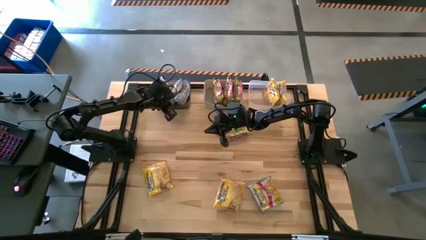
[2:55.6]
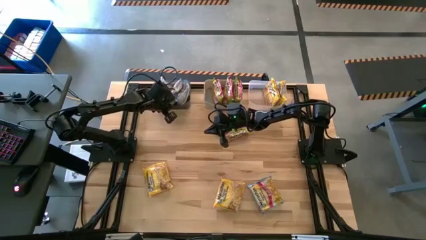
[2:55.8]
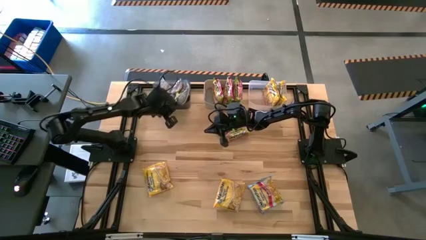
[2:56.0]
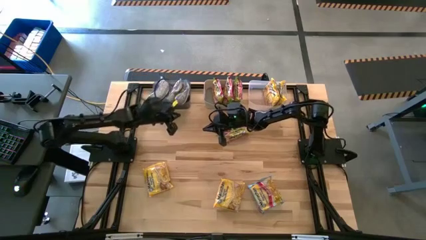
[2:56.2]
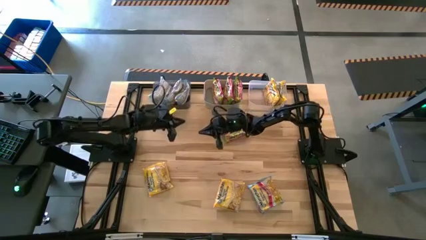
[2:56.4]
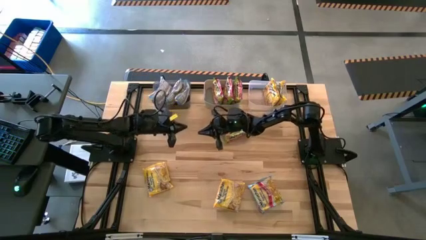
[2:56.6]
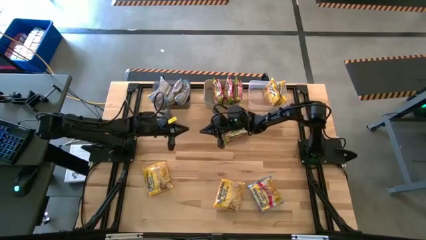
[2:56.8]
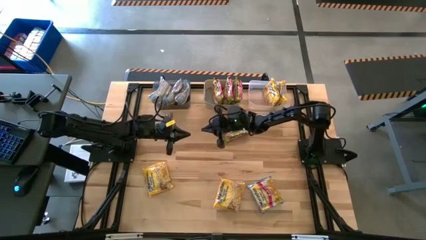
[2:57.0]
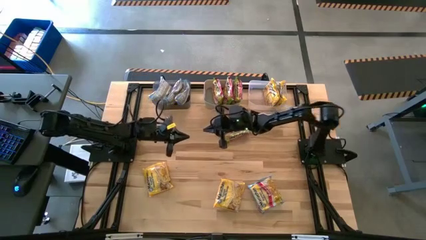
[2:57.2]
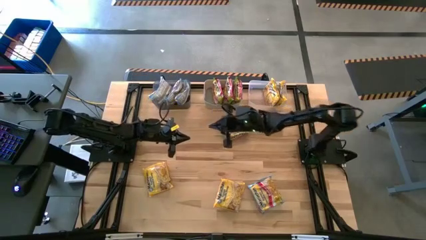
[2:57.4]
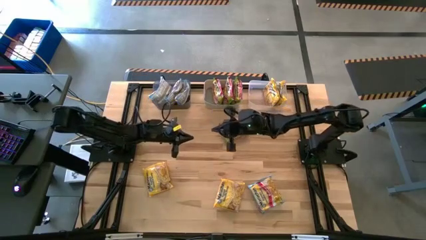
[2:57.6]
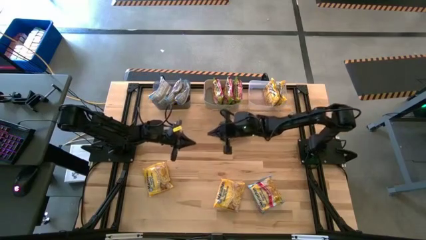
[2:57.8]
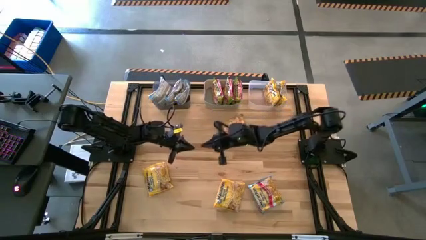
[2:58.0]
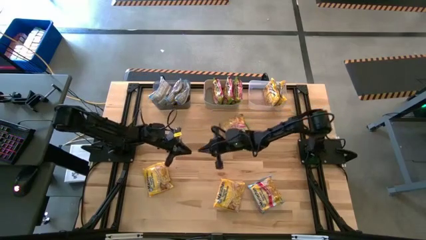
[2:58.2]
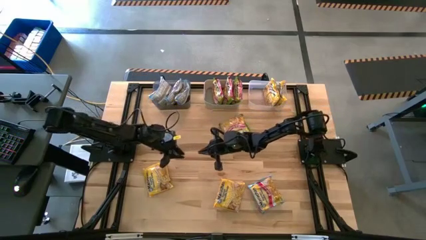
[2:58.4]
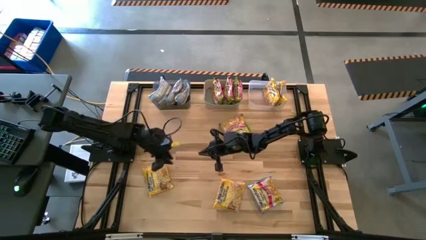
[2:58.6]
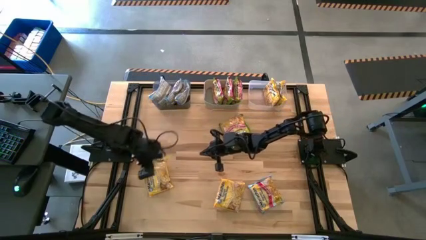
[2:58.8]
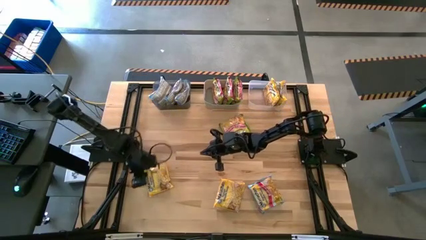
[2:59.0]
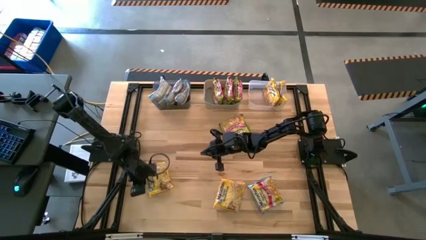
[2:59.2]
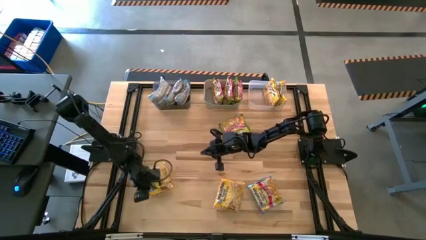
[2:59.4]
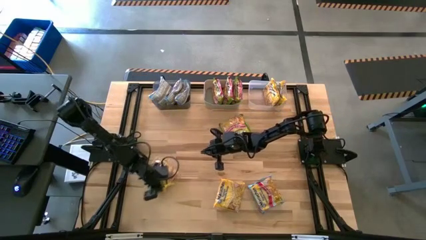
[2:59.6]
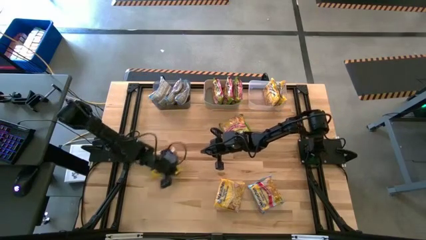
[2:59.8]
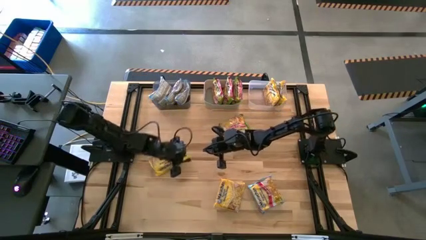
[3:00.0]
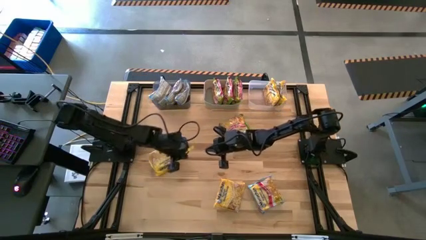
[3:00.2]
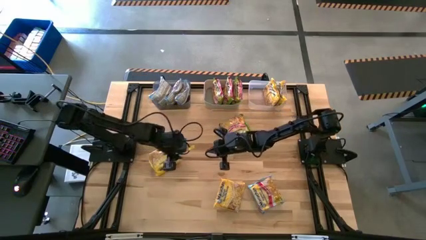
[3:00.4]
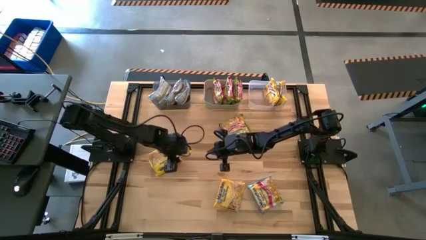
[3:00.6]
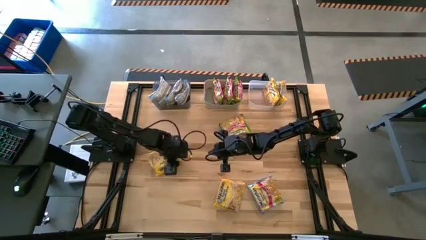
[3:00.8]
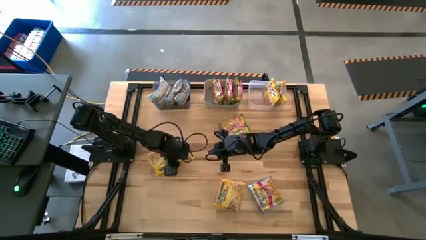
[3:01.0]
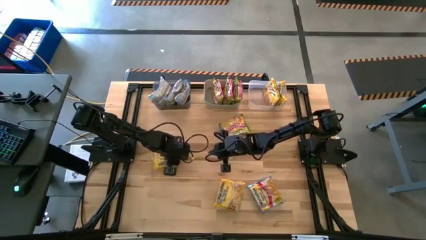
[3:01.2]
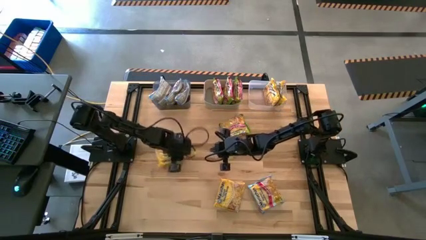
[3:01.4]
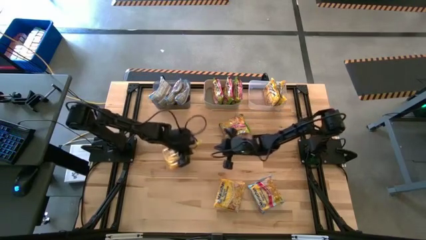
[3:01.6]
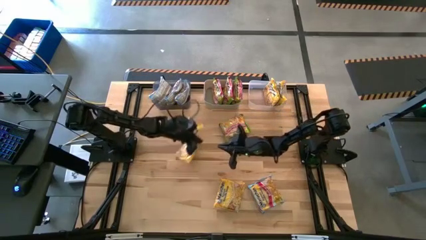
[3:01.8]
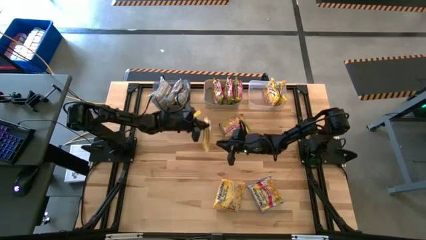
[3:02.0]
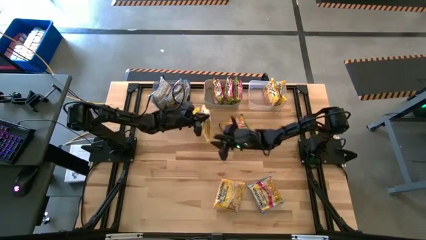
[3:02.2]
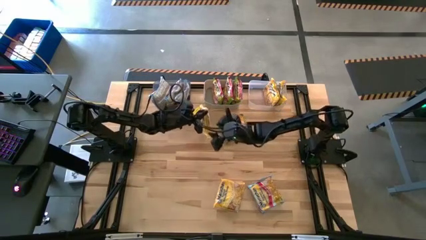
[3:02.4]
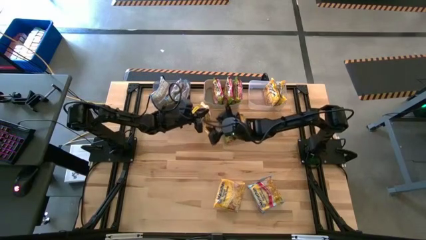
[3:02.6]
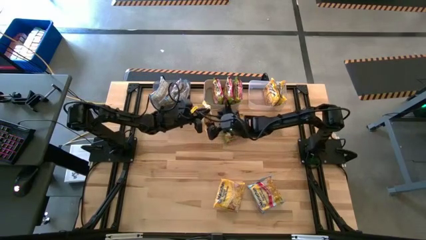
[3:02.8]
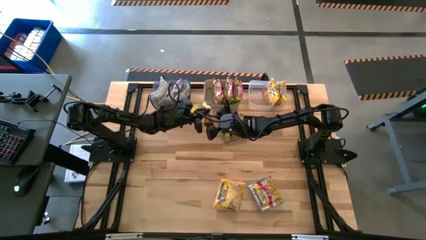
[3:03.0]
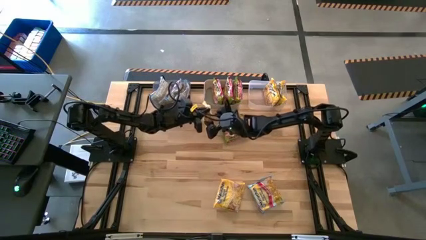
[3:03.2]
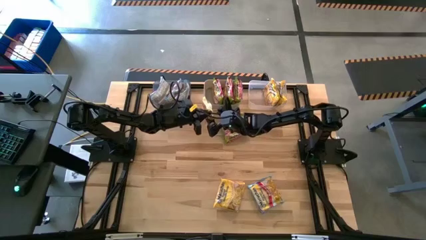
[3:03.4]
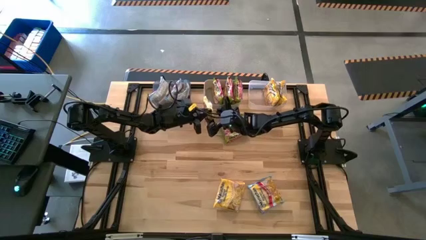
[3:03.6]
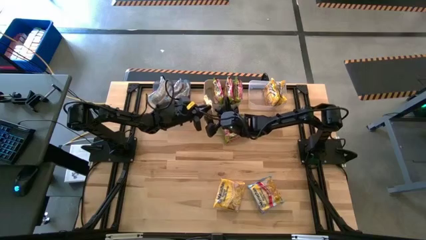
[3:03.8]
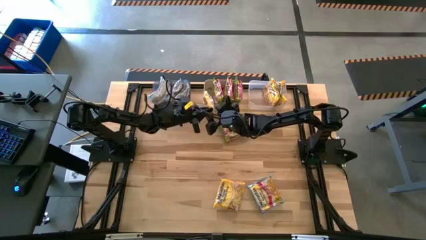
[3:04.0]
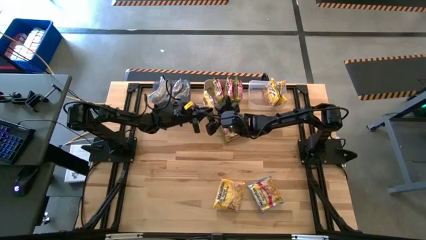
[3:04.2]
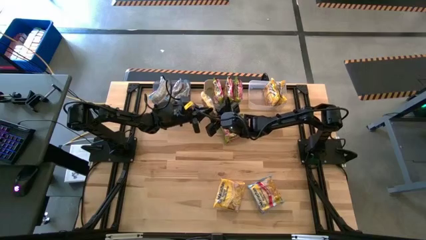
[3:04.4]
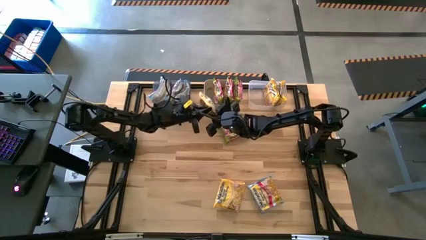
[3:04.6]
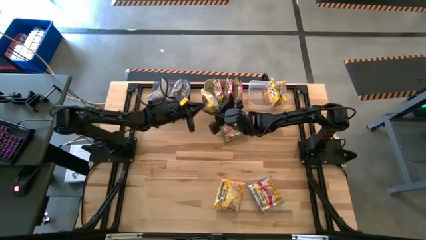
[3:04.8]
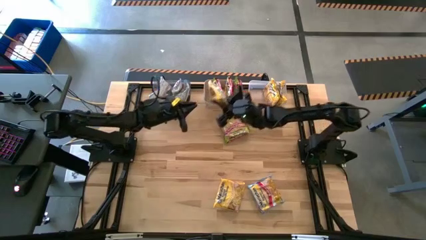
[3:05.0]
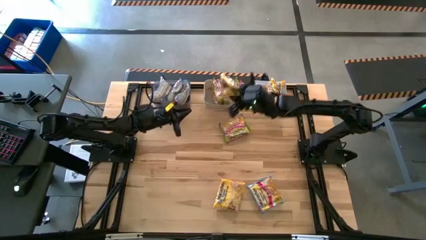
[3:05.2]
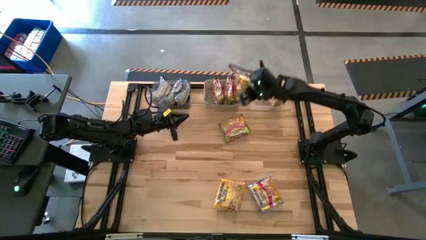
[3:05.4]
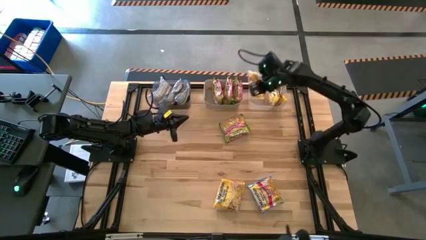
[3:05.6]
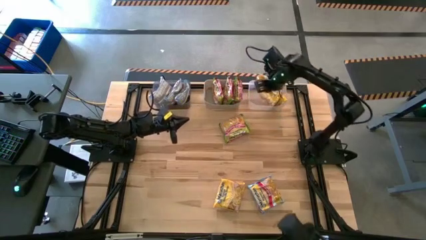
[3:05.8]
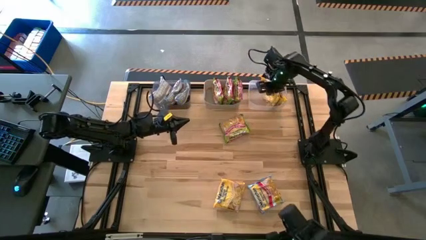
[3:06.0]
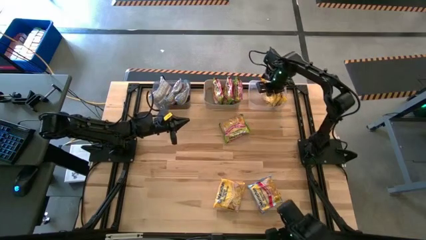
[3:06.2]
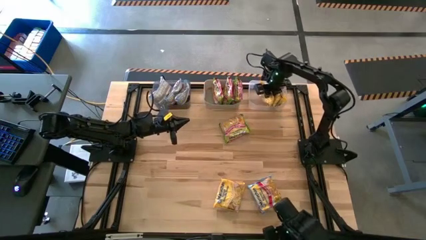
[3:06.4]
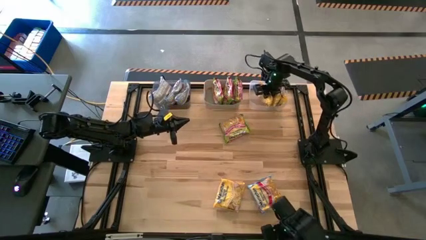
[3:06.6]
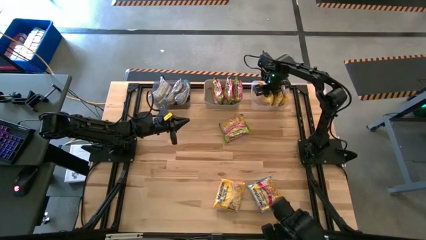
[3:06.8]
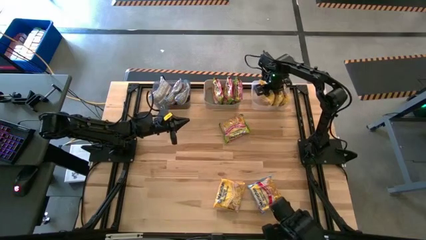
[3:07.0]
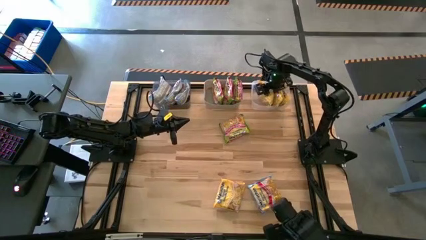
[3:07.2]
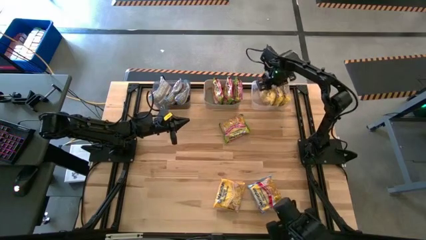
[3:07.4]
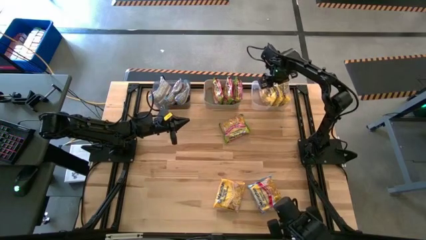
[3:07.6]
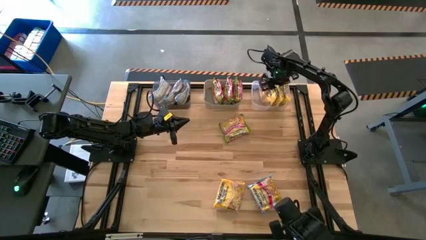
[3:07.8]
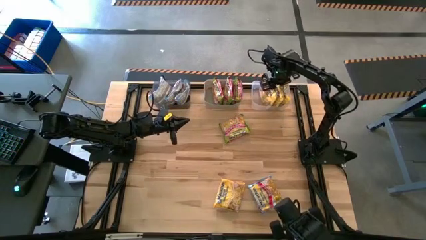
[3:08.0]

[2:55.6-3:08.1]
Task: Sort Maruchan noodles
Put the left yellow noodle pack into the transparent bin

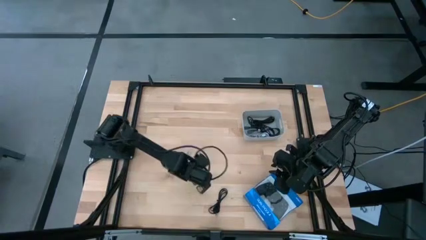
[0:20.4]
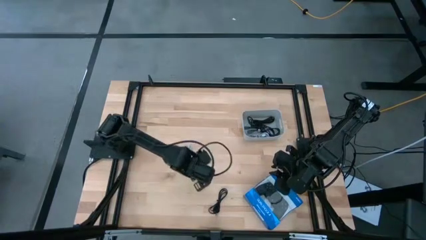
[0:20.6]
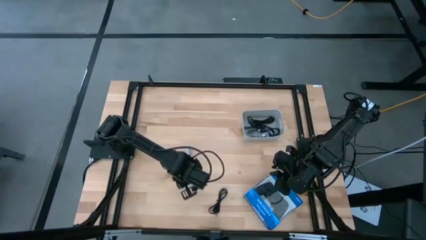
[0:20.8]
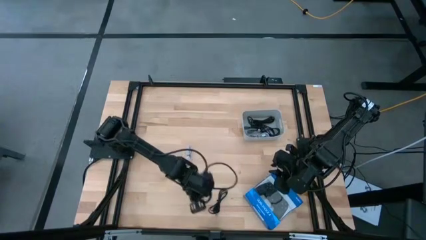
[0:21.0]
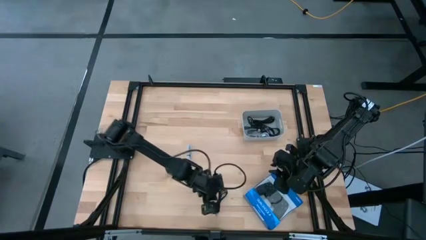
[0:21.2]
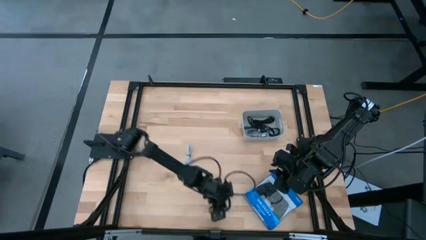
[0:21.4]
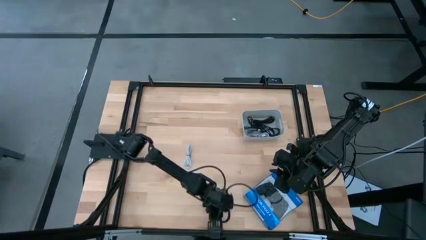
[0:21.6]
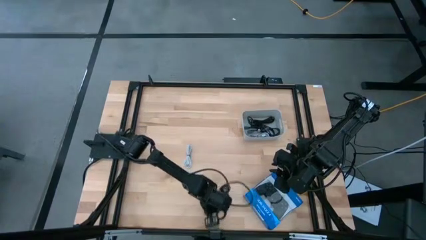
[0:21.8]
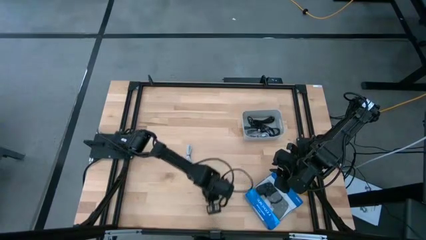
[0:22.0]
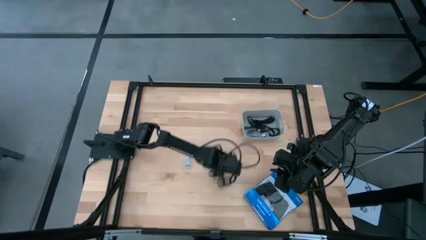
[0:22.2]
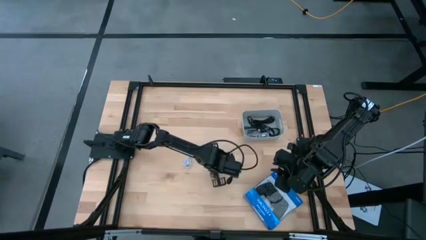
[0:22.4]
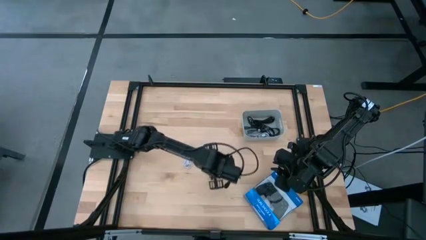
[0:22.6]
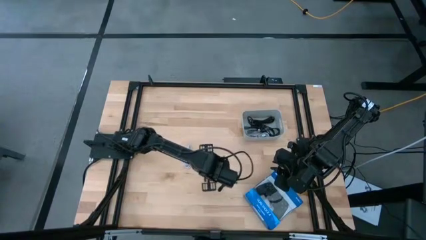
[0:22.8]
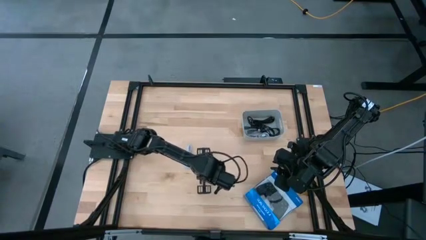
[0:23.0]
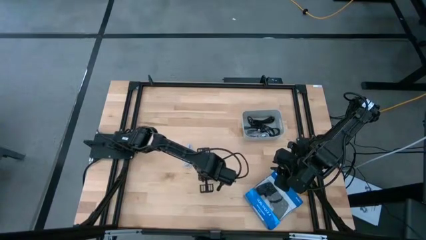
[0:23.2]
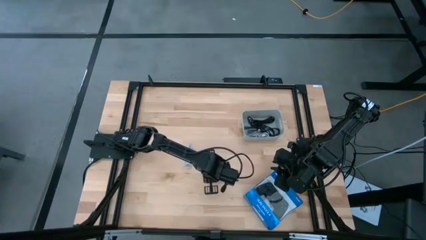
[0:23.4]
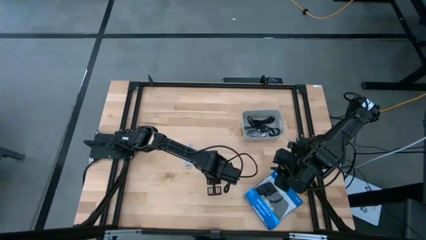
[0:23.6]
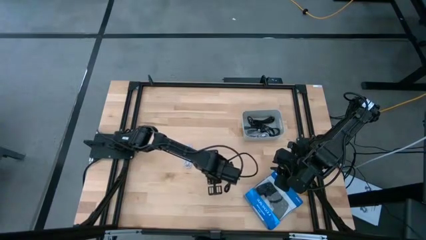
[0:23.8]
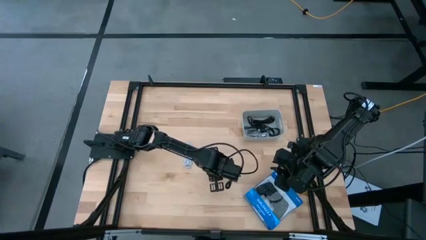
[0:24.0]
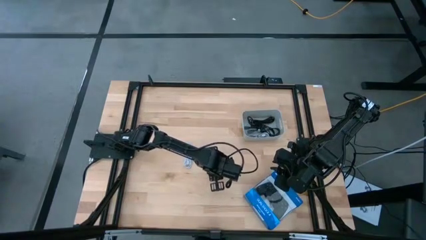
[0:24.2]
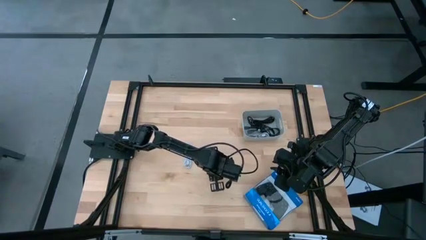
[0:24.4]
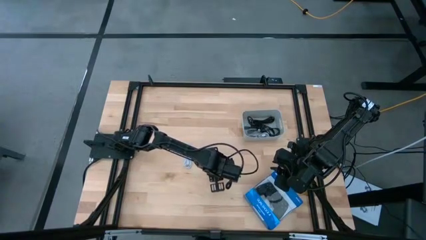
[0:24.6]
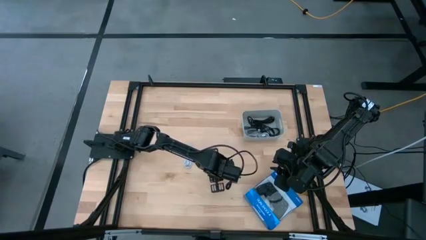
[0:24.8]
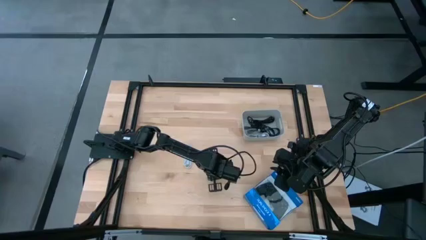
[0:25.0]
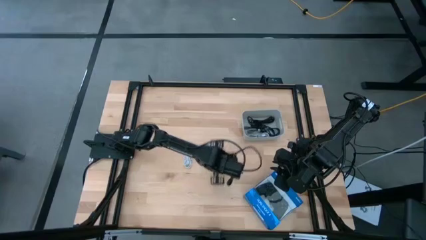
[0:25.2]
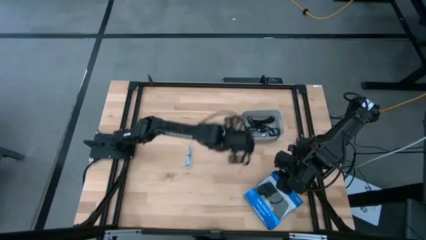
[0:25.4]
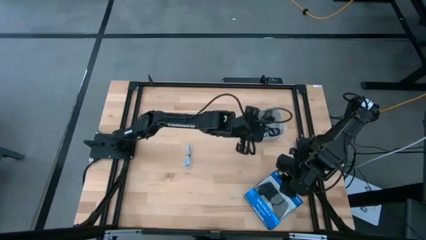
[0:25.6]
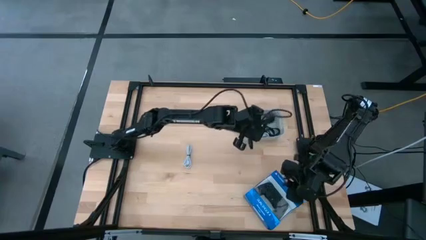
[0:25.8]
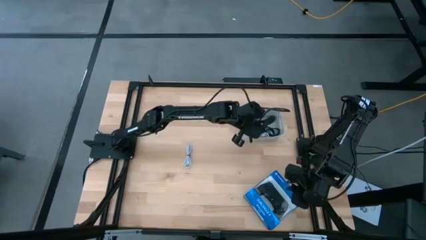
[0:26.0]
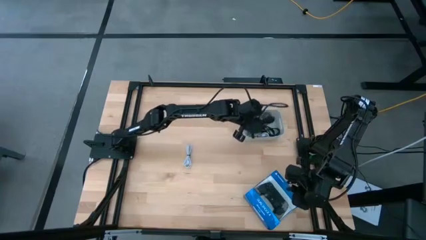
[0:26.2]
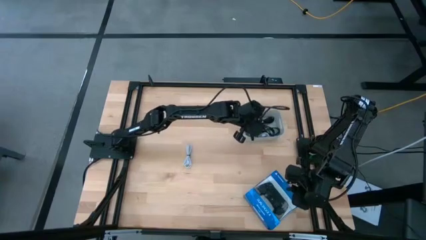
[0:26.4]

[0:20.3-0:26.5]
Task: Pick and place USB-C Cables
Put the black USB cable into the gray bin
